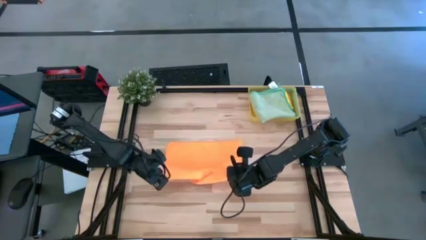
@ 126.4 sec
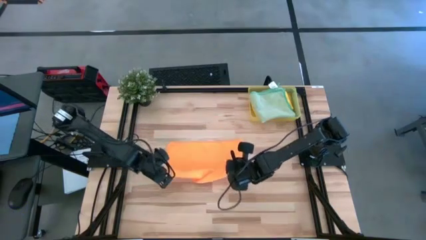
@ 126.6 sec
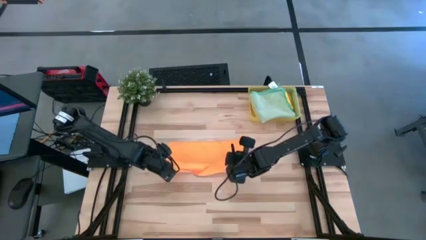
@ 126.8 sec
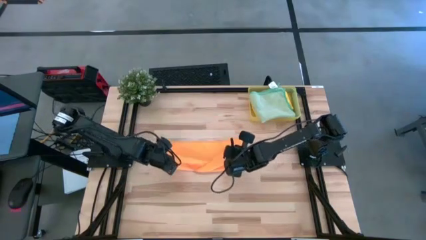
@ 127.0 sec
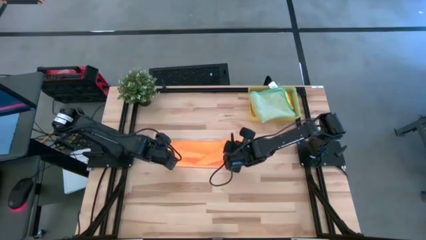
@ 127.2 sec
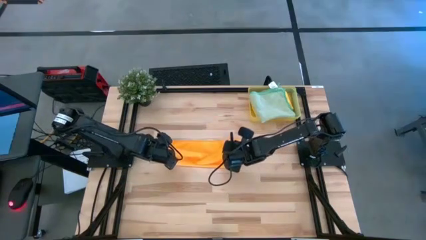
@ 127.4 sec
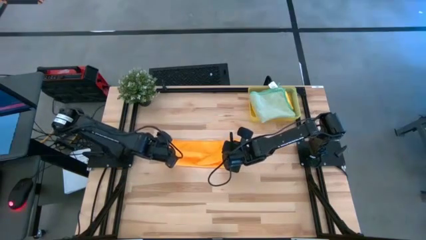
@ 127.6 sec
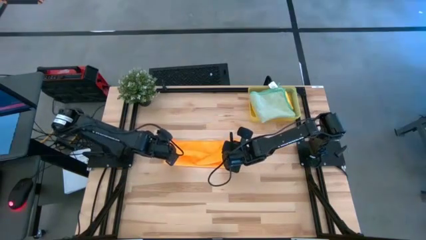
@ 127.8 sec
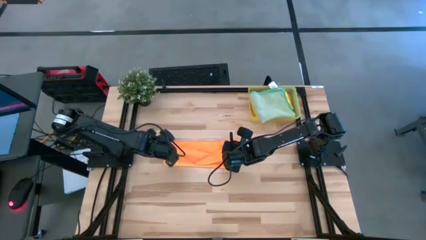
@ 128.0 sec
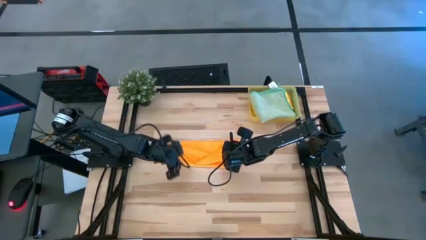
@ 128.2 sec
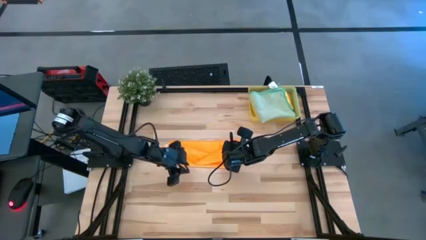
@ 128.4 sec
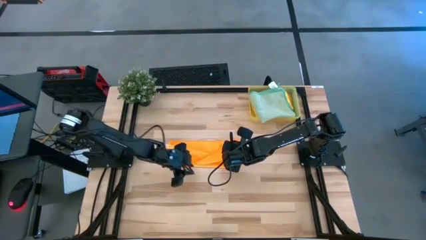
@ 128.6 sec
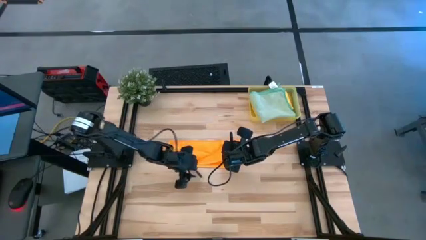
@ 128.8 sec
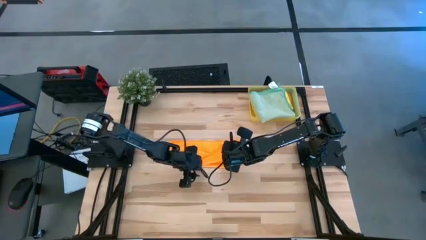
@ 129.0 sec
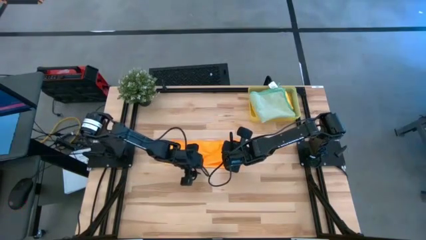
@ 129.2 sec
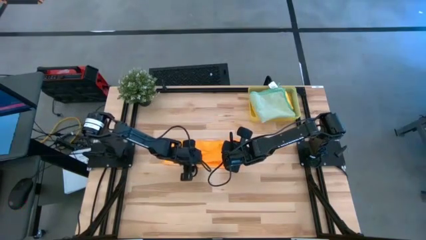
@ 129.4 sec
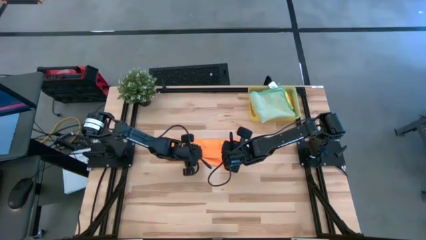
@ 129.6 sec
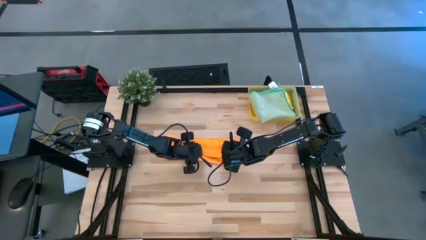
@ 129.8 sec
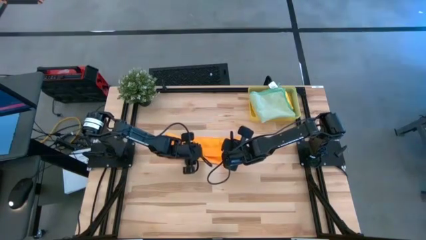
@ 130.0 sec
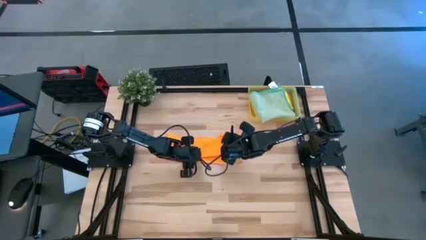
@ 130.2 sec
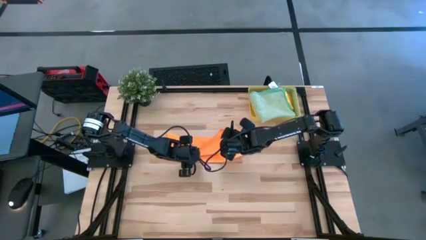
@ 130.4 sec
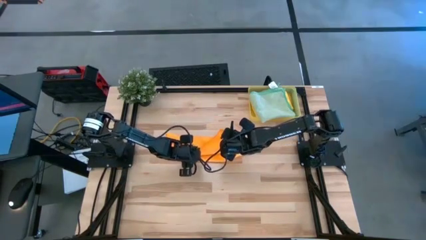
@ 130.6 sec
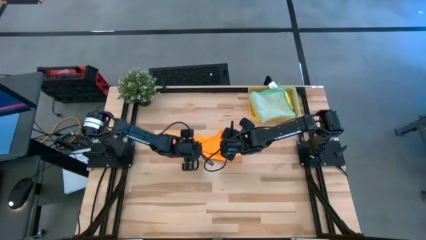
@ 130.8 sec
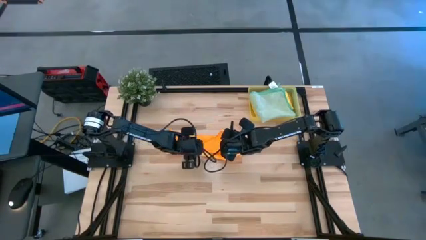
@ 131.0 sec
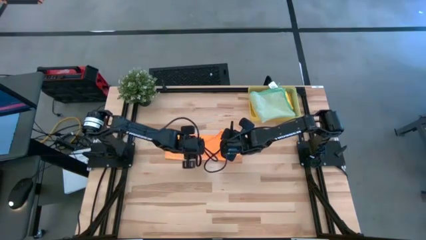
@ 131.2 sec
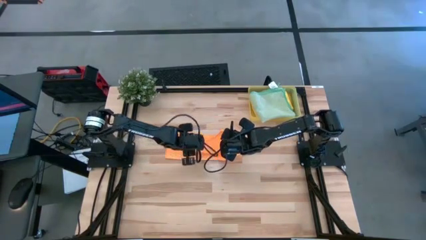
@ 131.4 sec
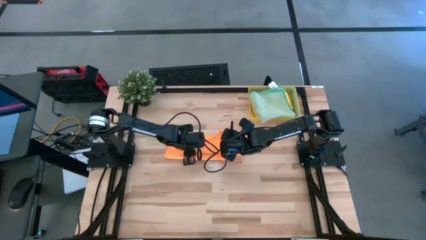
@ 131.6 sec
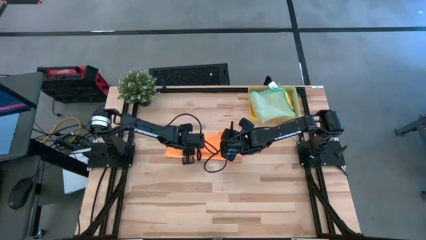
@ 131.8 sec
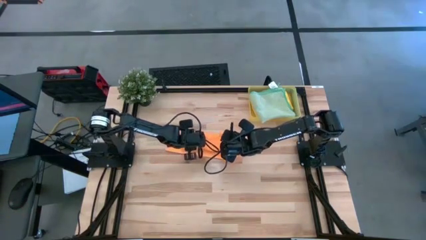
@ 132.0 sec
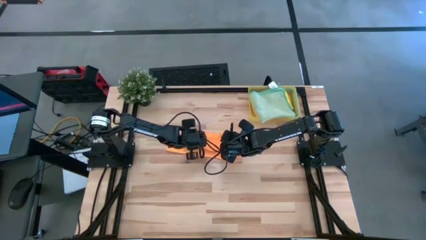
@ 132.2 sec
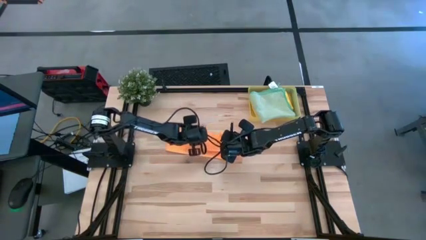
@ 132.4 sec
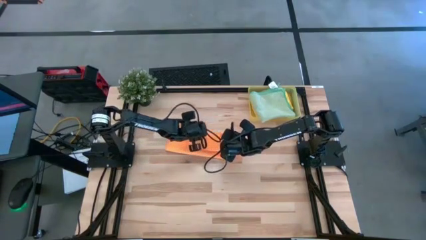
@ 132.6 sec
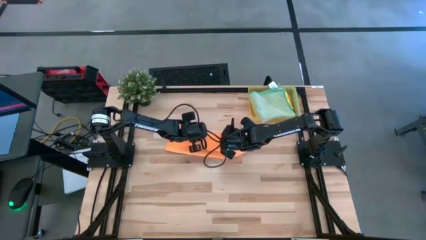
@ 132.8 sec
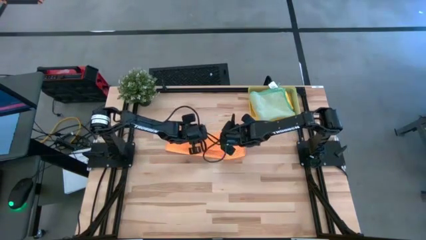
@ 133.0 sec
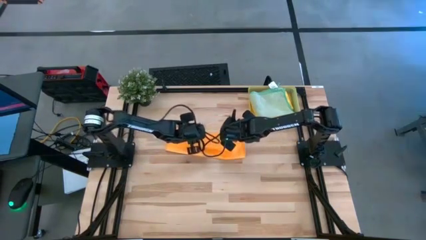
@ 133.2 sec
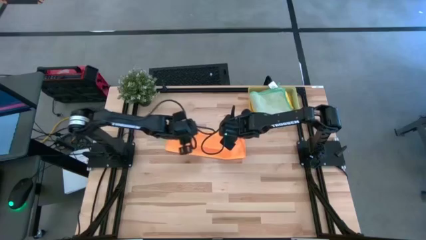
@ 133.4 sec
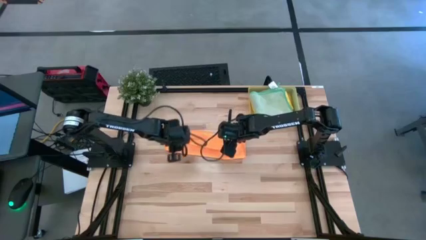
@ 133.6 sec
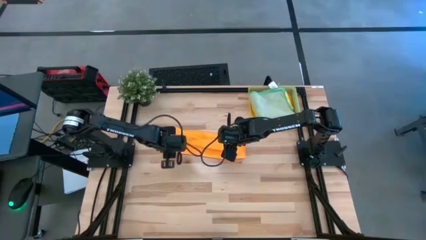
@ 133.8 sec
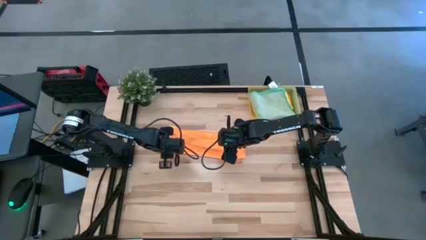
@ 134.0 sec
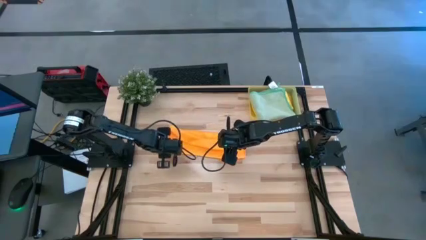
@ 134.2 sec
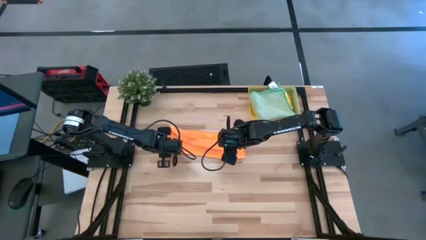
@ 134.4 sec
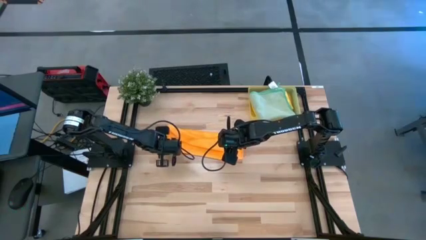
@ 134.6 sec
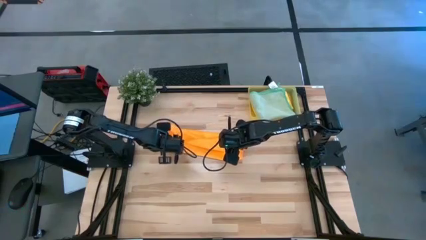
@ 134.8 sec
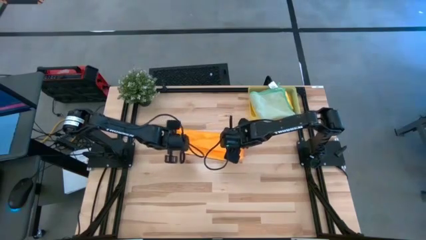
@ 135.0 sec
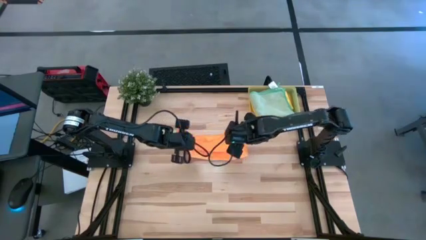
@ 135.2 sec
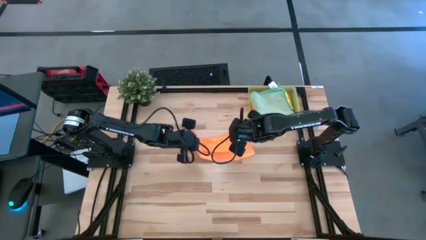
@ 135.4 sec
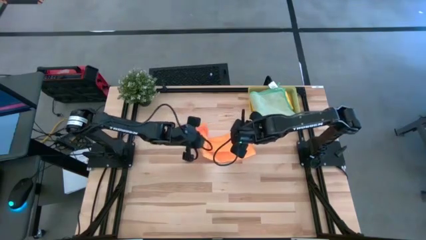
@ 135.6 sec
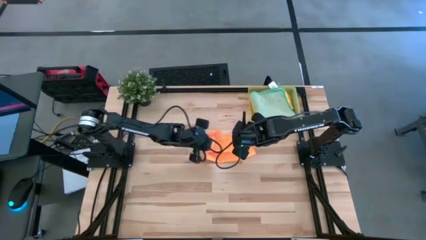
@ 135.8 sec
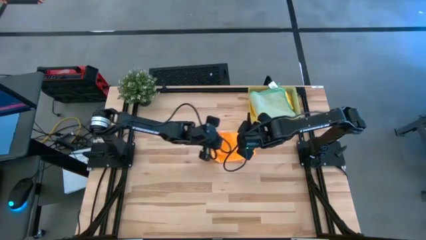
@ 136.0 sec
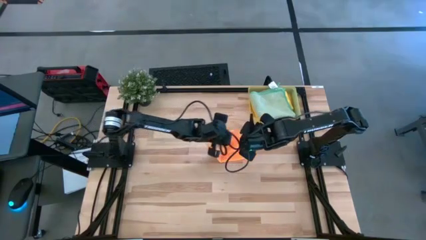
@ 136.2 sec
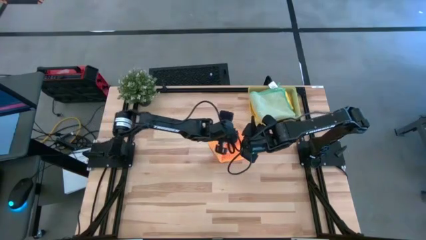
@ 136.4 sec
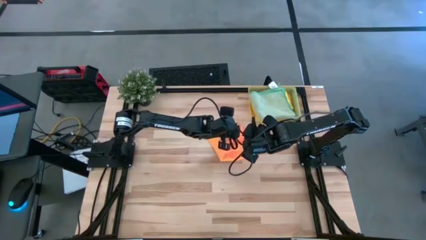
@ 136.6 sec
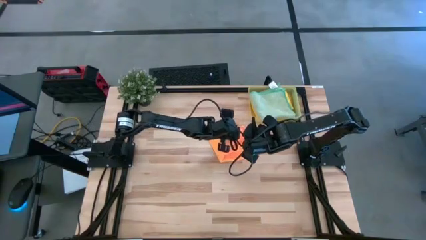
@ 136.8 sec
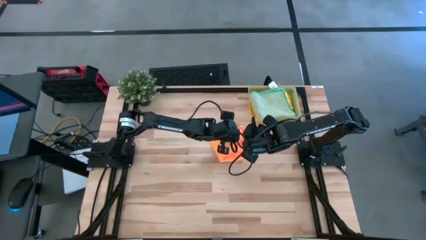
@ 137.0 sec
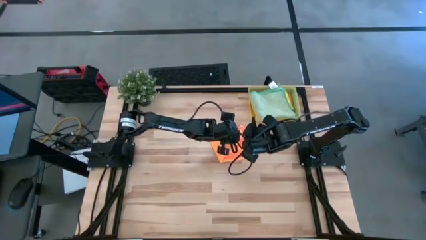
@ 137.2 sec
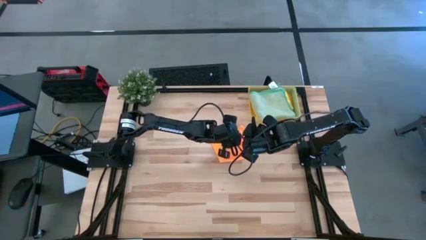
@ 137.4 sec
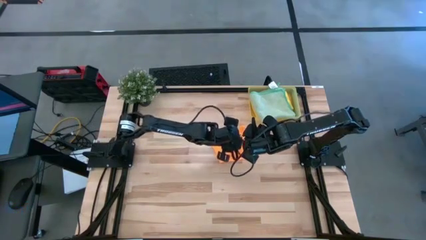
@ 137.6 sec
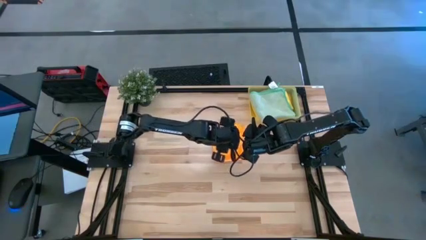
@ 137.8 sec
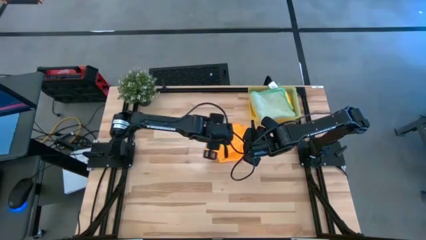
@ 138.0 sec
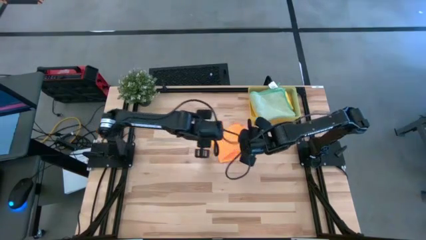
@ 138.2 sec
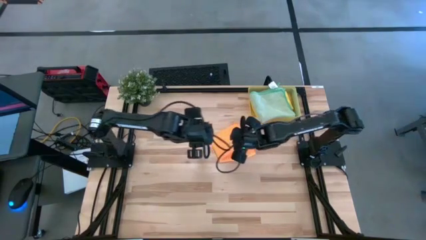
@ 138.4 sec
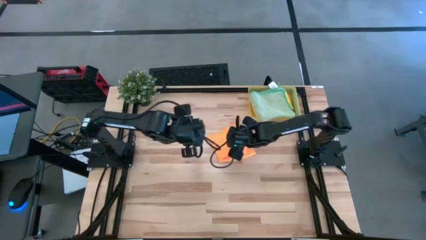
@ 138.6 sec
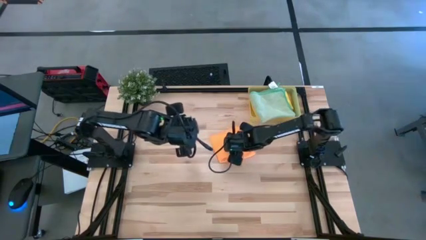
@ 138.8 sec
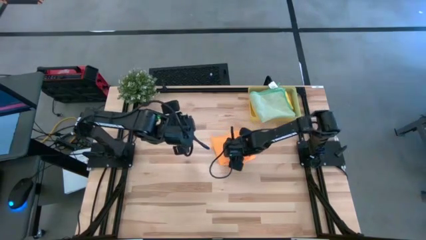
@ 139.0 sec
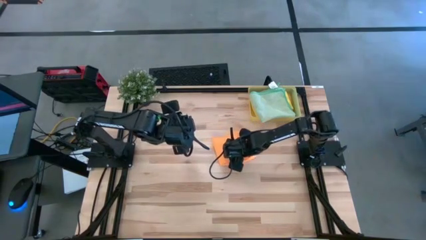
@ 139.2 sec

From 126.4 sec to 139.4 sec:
Task: Fold microfiber towels
Fold the orange towel

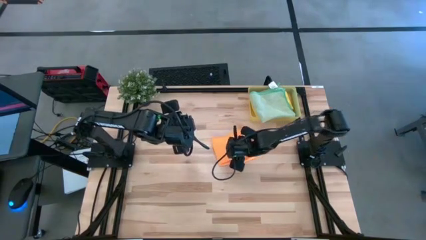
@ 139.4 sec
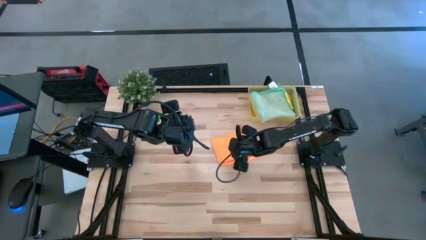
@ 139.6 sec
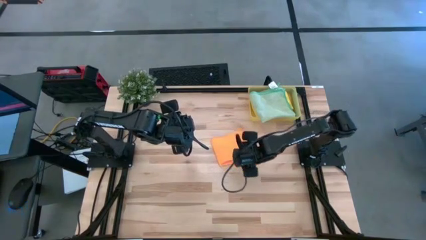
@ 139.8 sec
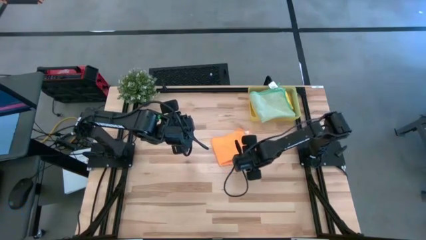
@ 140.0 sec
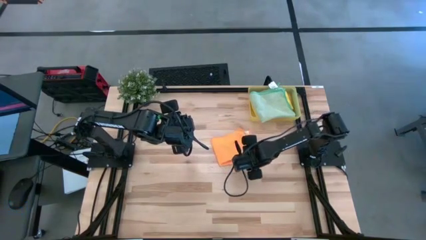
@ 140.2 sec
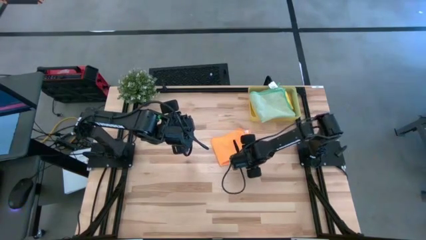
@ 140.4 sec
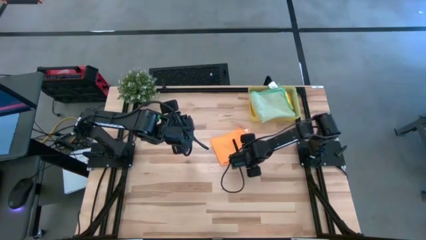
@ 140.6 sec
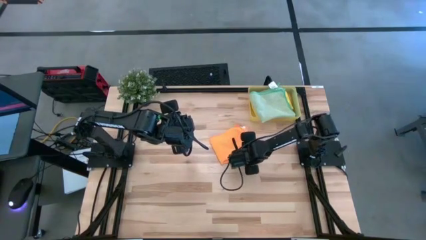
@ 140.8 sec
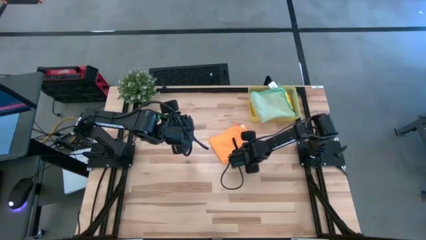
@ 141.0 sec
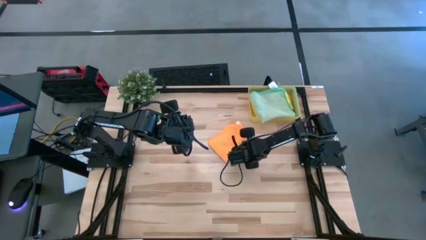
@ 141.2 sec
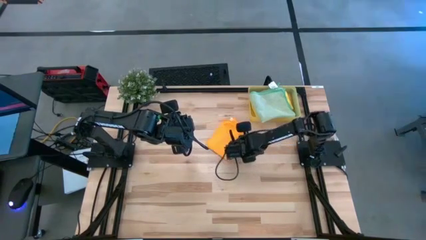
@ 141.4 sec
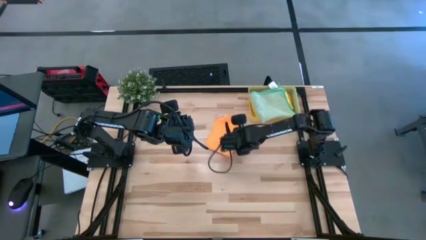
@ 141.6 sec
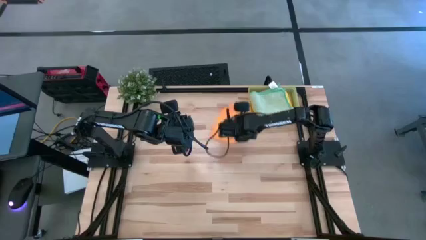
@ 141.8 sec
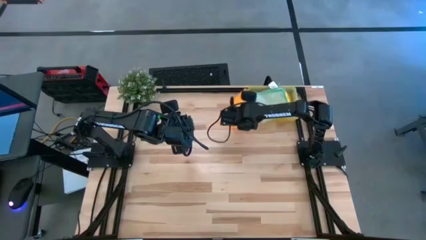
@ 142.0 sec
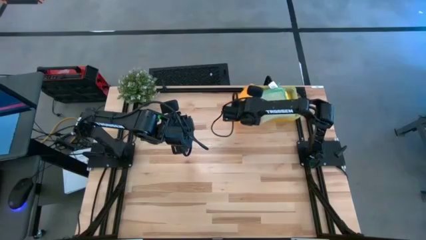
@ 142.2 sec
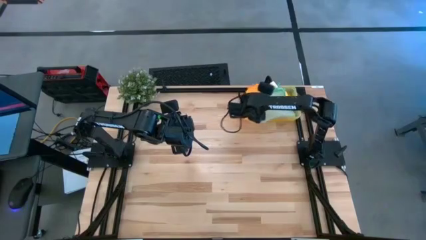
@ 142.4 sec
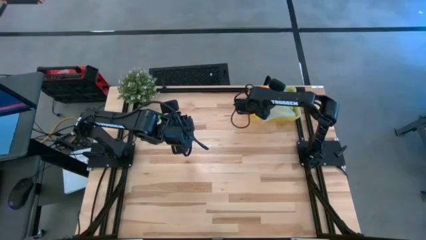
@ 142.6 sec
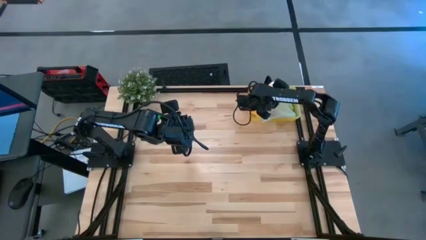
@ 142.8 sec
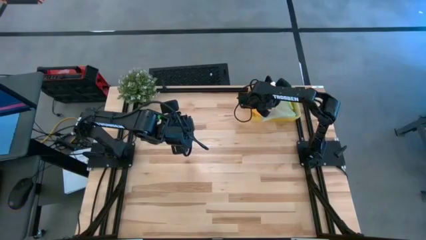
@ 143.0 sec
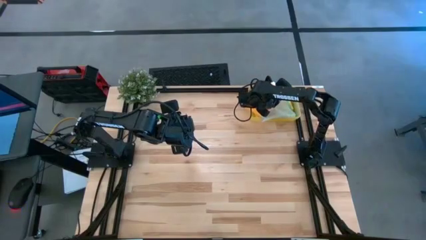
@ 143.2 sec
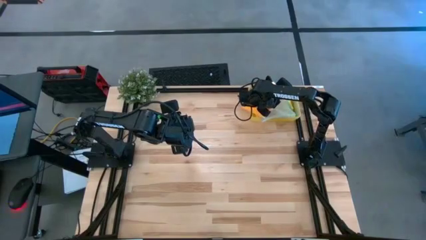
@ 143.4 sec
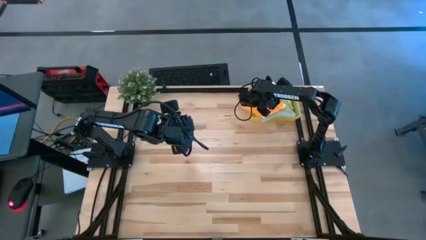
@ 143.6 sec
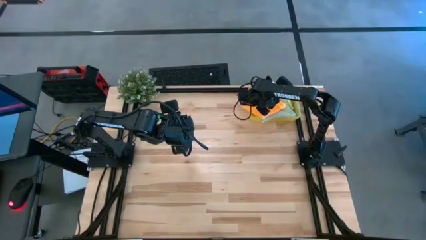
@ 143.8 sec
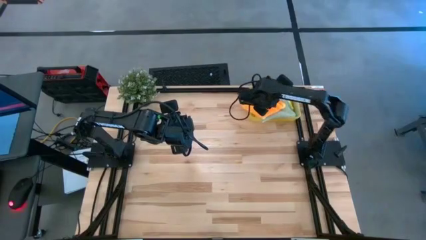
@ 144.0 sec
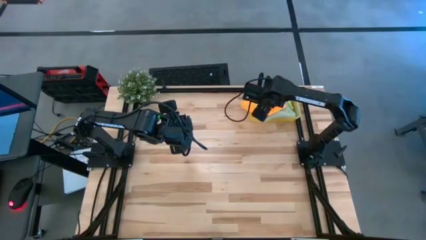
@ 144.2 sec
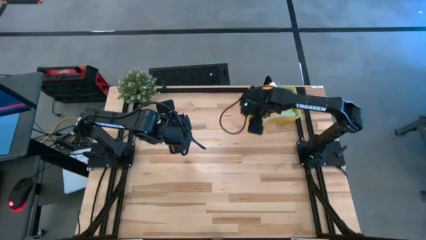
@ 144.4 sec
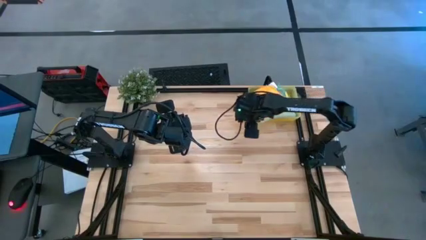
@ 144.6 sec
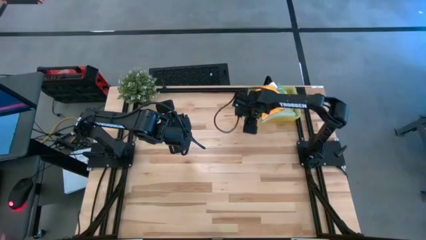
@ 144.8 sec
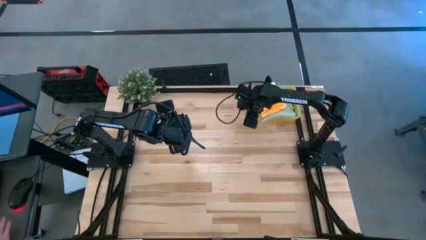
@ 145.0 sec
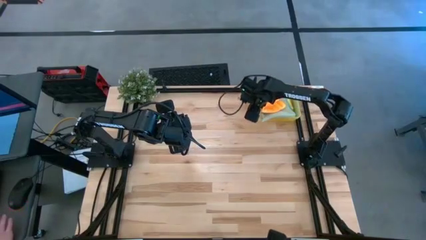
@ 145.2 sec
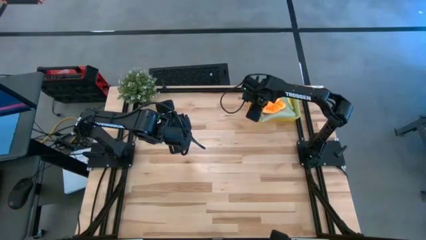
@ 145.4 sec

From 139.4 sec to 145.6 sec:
Put the orange towel into the bin
